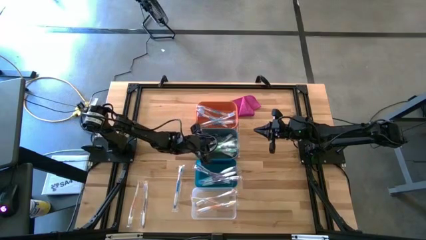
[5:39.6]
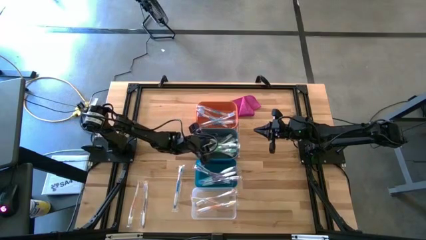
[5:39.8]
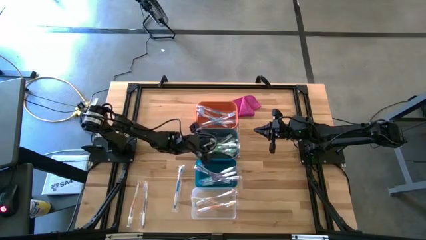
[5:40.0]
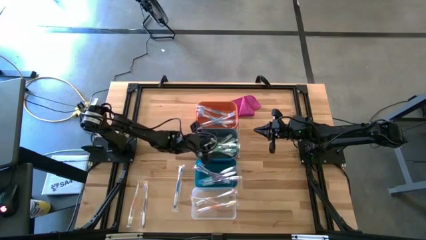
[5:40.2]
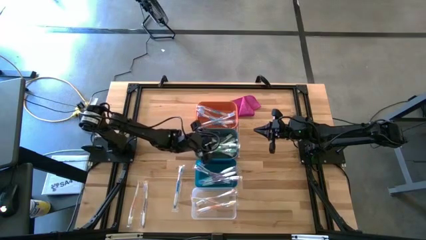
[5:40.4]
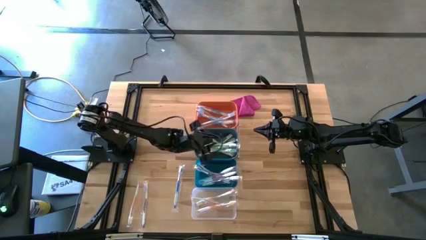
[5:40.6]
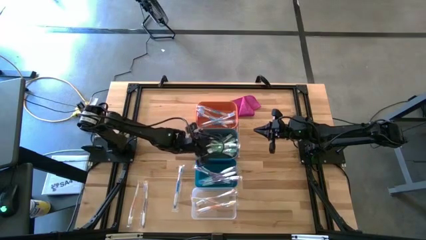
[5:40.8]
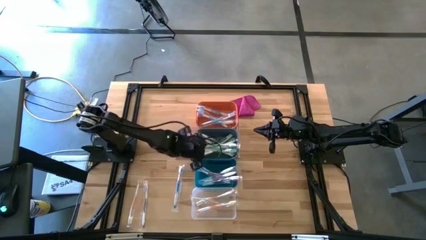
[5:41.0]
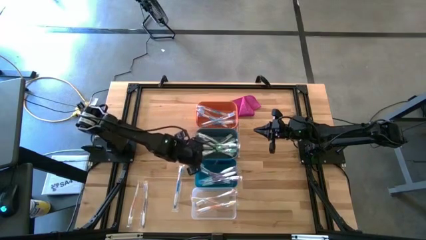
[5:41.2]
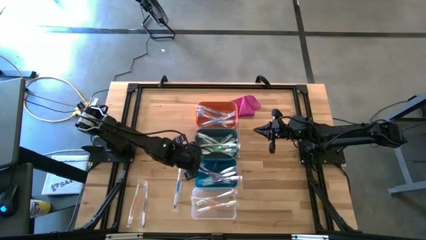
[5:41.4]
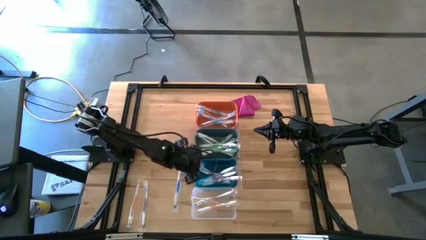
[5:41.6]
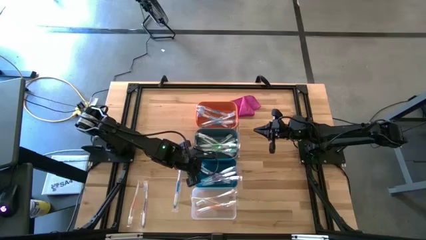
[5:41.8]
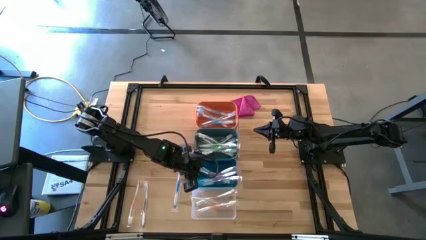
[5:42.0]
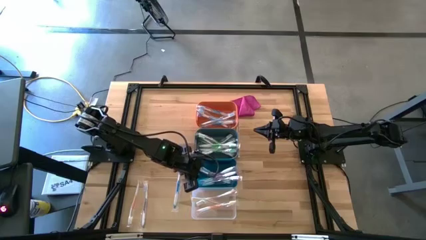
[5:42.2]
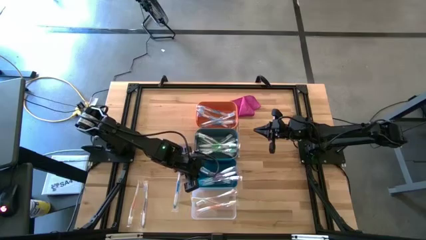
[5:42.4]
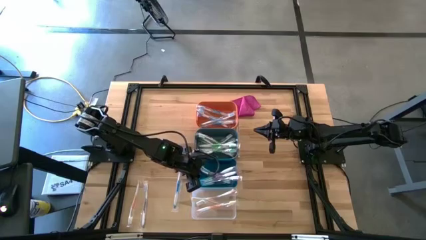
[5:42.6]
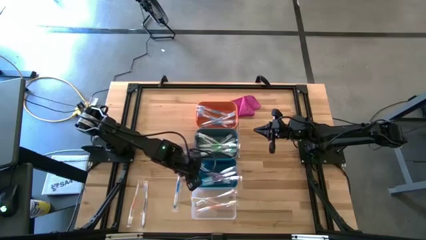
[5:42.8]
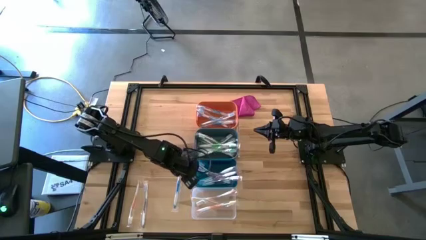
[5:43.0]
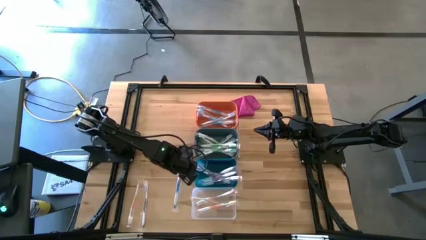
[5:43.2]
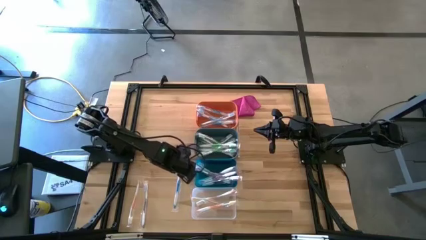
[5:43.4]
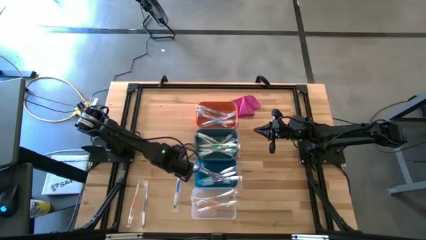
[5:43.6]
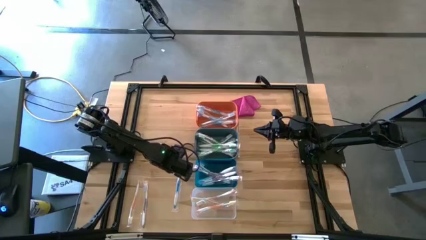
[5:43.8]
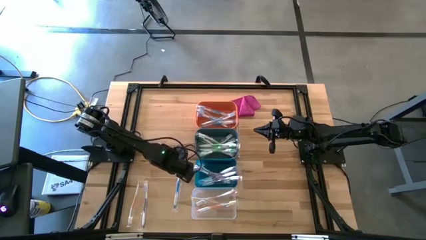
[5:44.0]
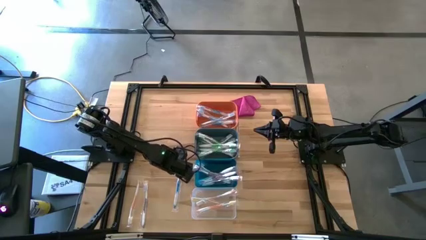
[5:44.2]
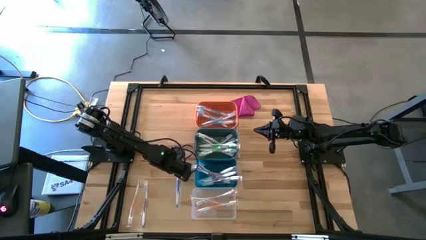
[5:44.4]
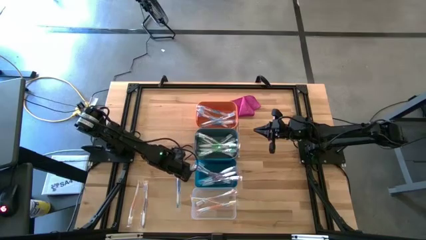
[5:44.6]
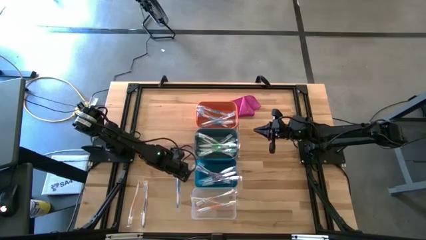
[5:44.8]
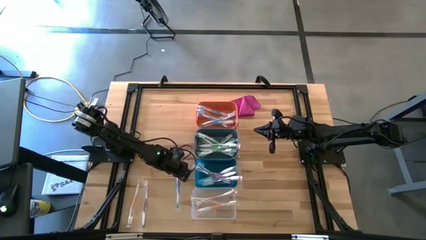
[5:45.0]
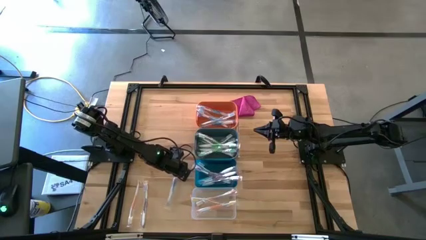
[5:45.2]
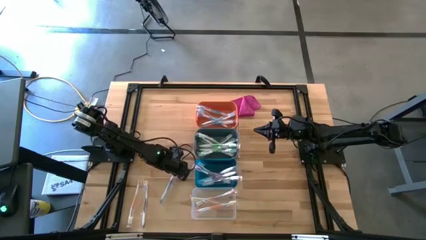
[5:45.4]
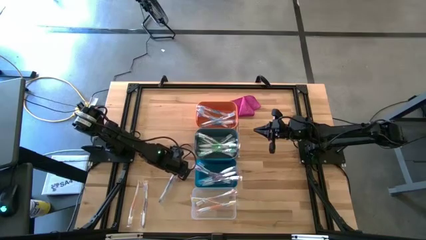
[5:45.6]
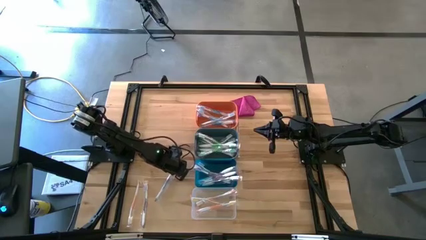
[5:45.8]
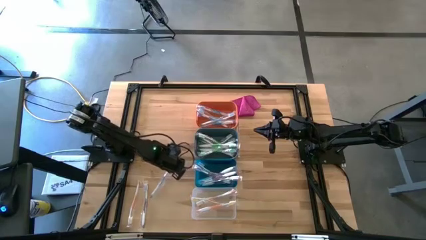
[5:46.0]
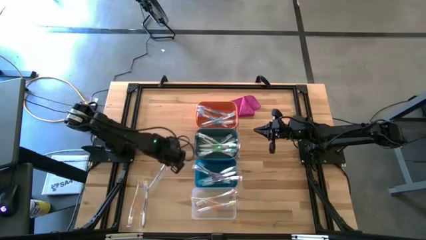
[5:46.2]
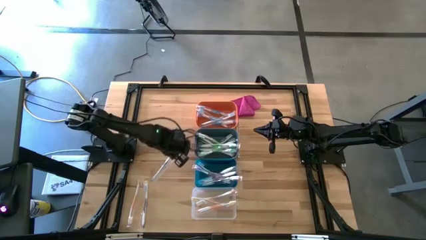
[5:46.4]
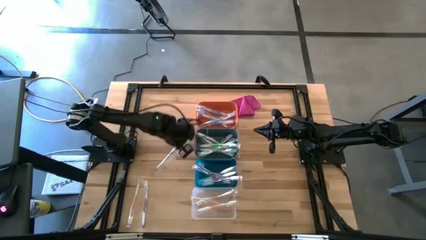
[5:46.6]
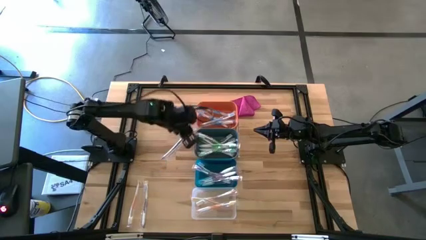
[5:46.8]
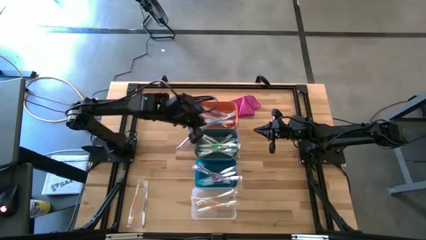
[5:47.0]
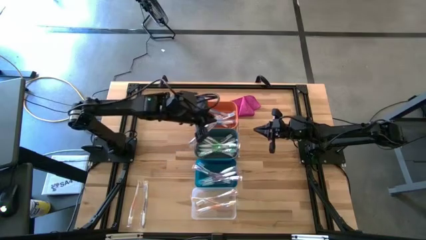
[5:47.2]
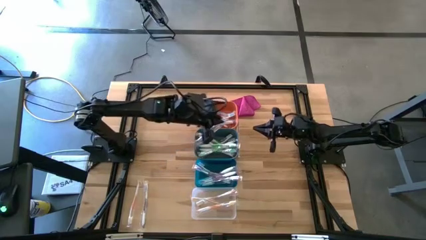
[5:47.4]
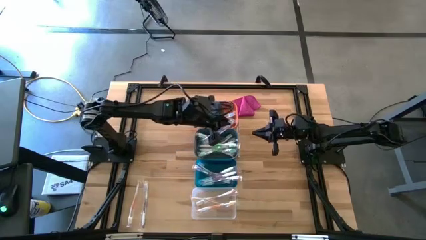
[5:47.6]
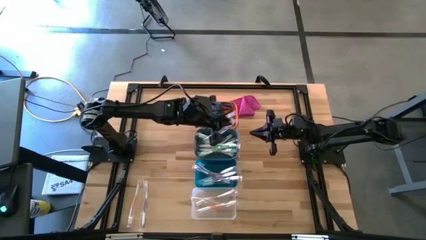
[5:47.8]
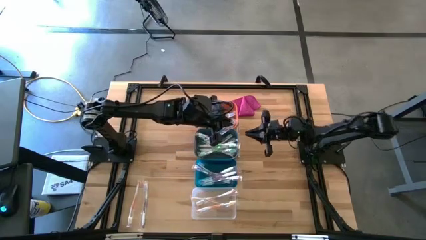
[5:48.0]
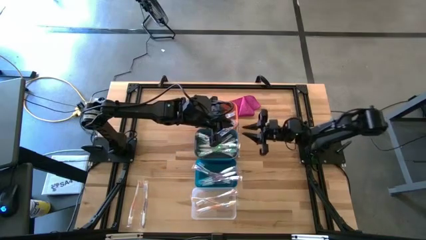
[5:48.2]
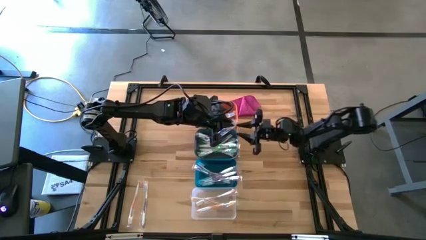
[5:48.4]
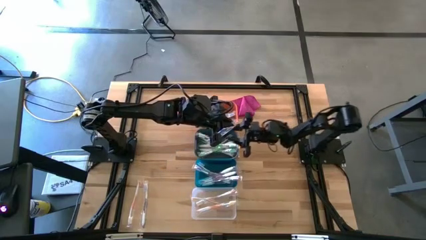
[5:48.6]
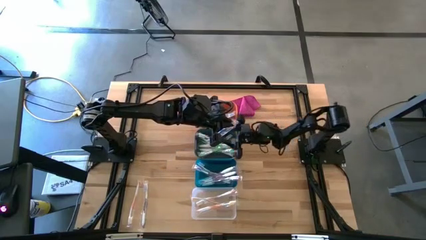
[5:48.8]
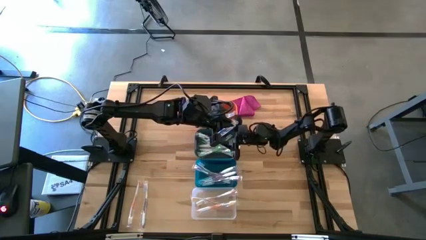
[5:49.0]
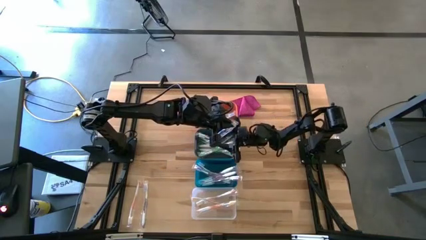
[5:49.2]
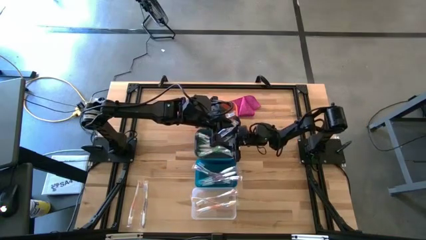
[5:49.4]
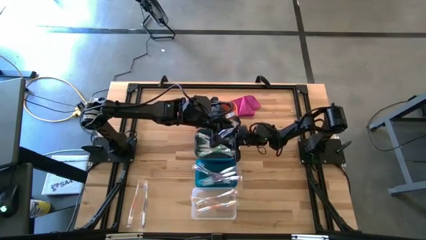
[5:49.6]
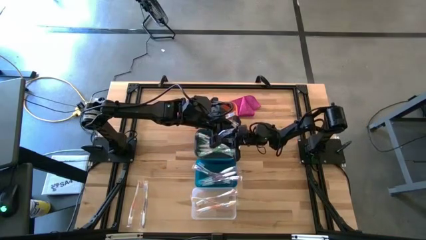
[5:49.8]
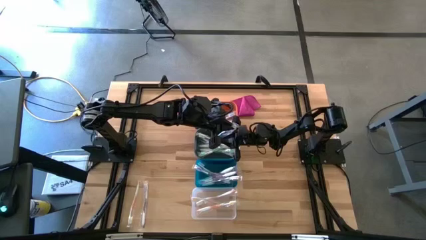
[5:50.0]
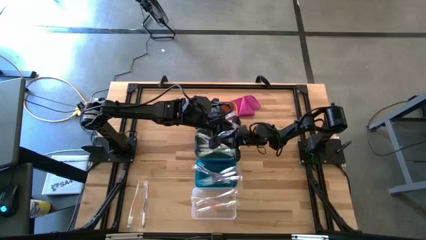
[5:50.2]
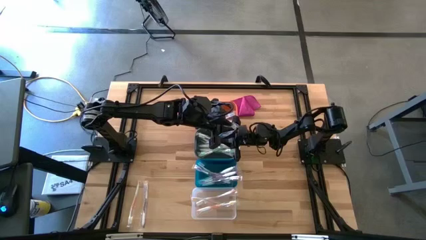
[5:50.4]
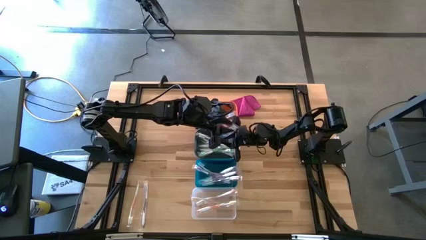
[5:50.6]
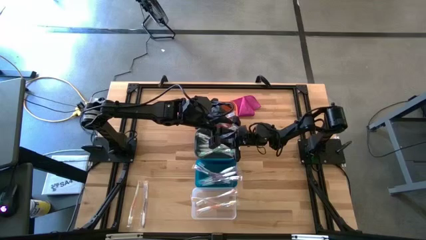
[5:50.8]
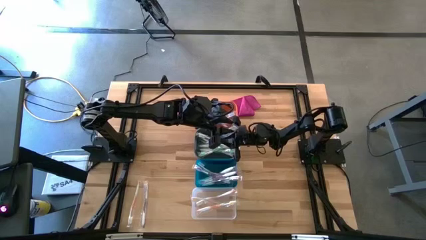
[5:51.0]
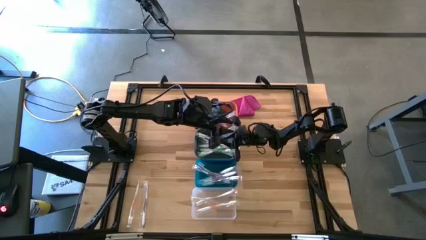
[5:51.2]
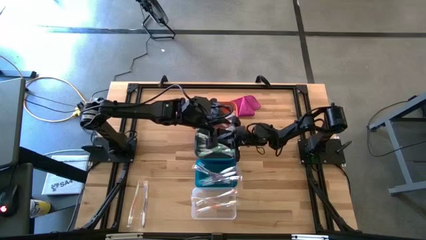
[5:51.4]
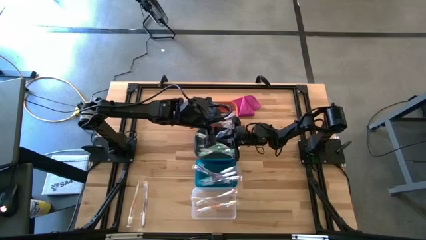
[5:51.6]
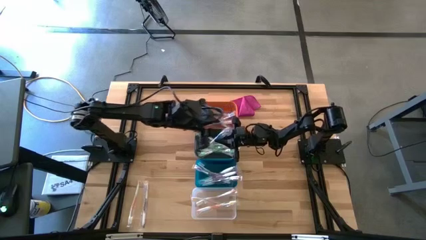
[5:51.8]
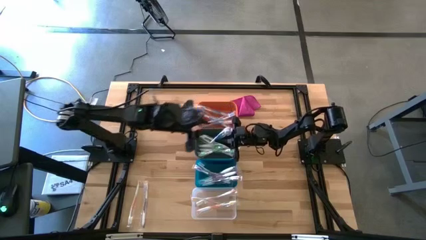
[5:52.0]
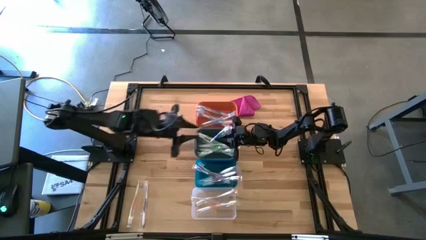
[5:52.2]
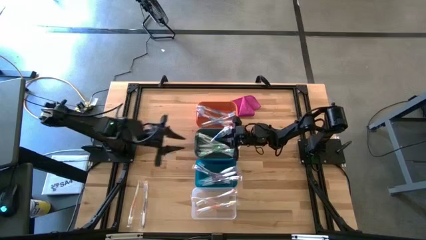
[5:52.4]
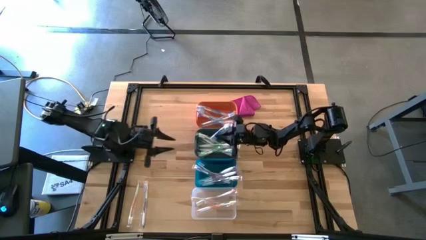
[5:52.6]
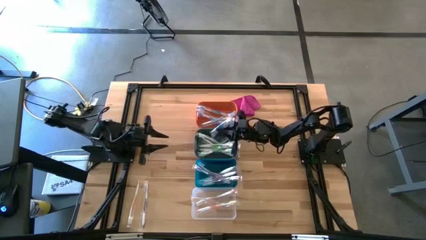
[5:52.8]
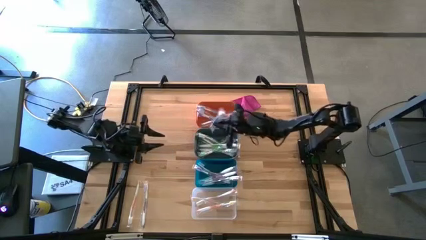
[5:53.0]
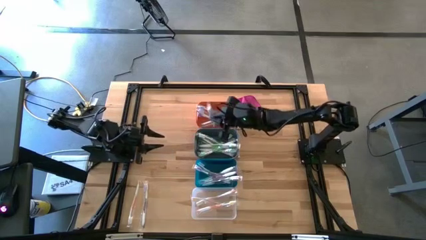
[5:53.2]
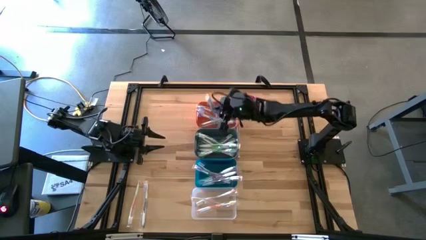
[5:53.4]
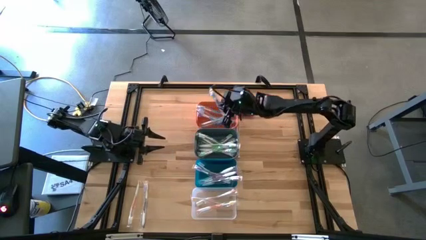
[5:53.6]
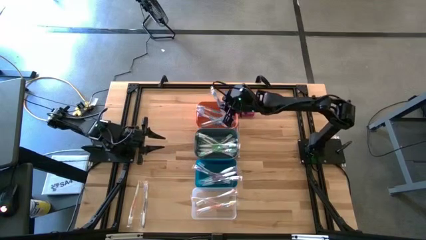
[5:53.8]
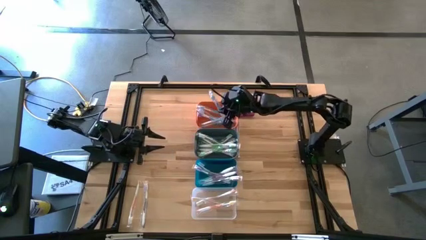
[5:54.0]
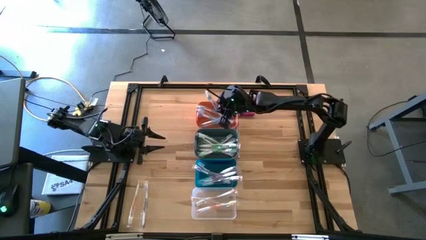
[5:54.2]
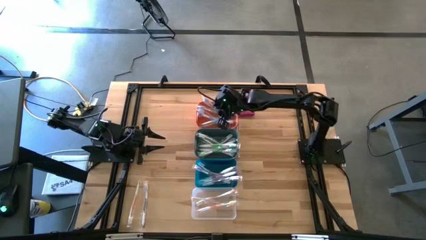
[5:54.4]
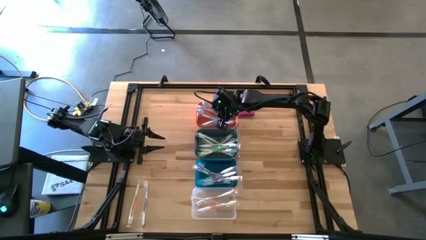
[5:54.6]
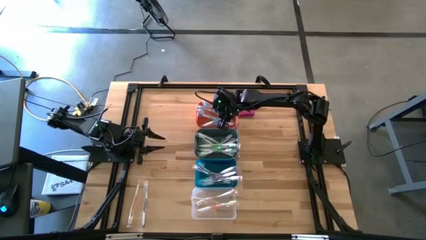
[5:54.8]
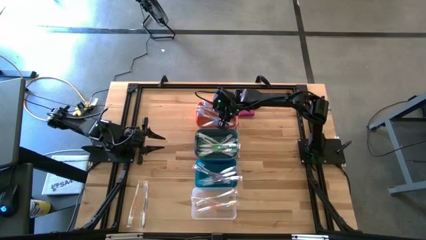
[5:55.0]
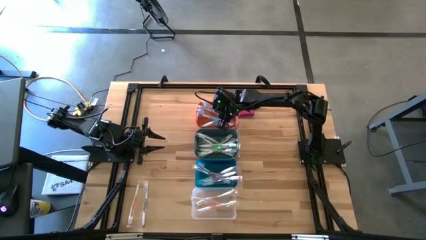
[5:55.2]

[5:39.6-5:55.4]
Task: Pick & Place Toothbrushes
Put the blue toothbrush into the orange bin

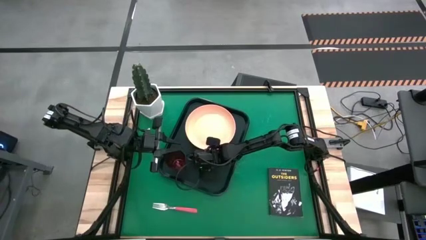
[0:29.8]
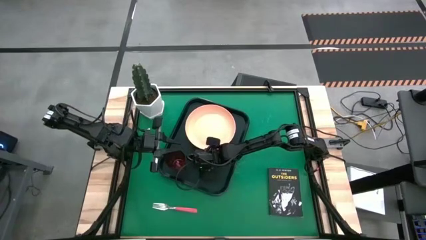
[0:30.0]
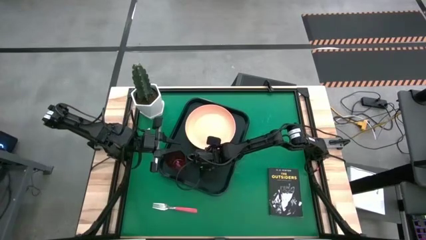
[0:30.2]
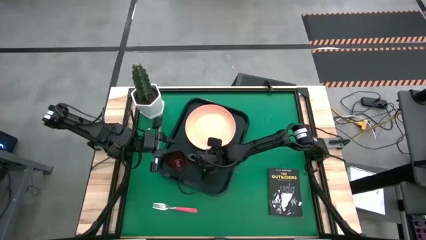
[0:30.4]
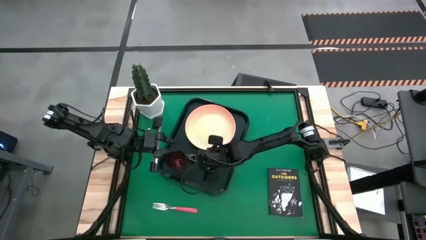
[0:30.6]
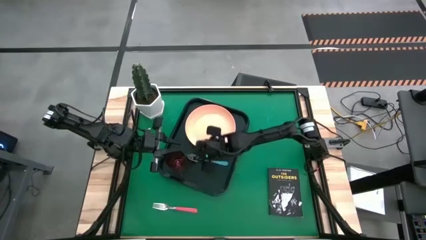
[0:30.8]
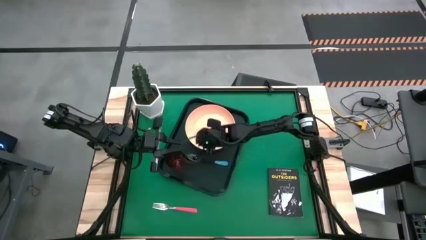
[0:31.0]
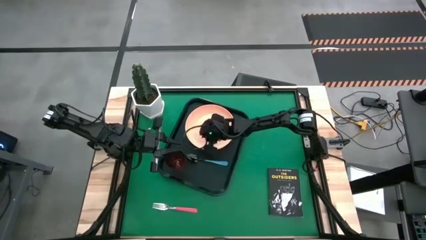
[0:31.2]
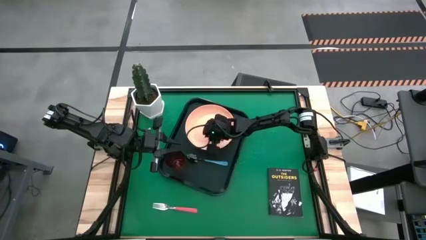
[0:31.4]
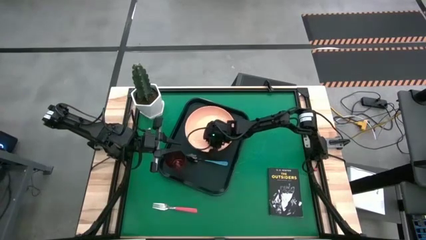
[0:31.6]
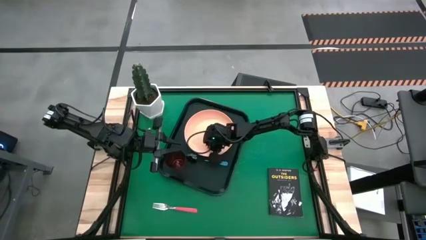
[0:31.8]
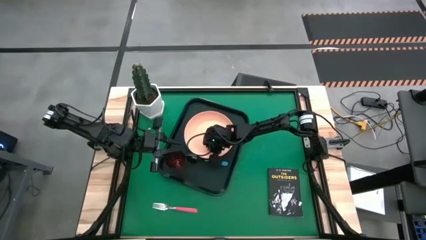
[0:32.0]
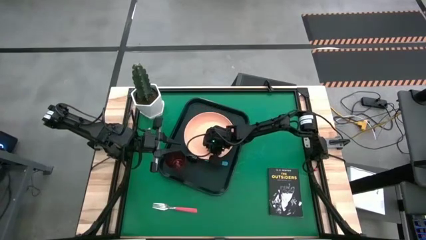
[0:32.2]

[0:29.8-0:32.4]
Task: Pick and place plate/cup/fork/spoon on tray
Adjust the orange plate
